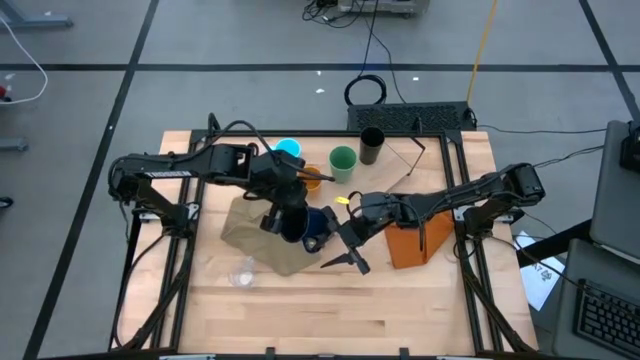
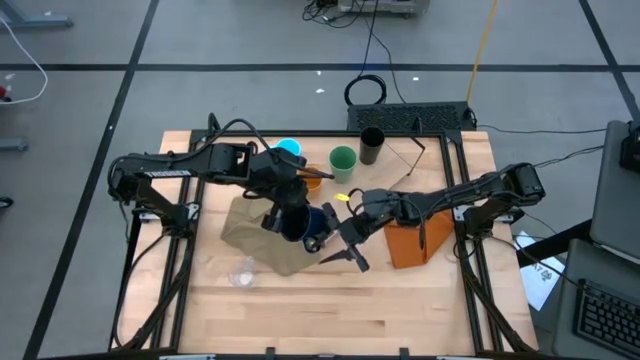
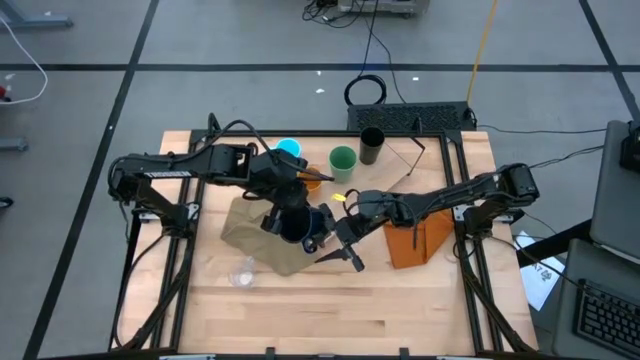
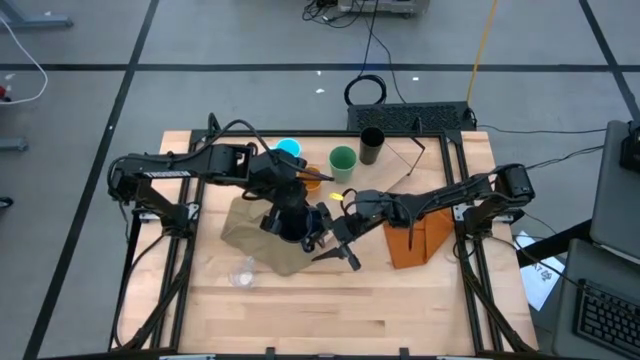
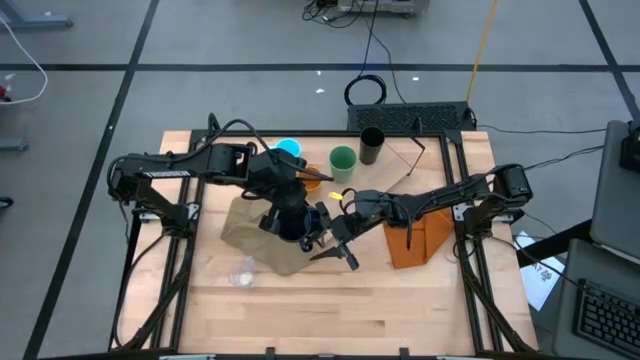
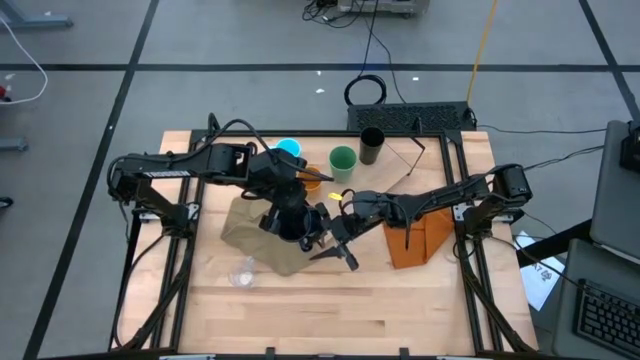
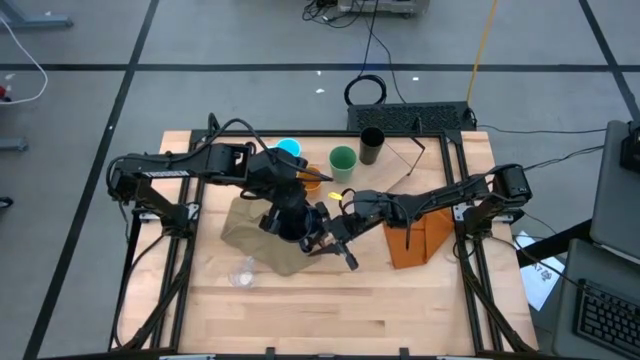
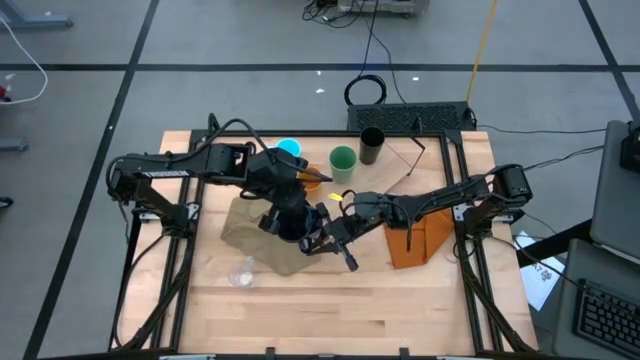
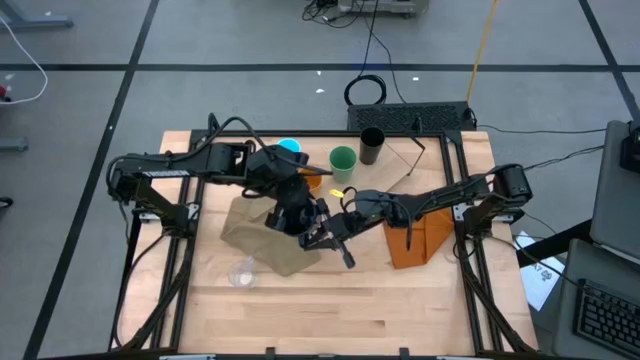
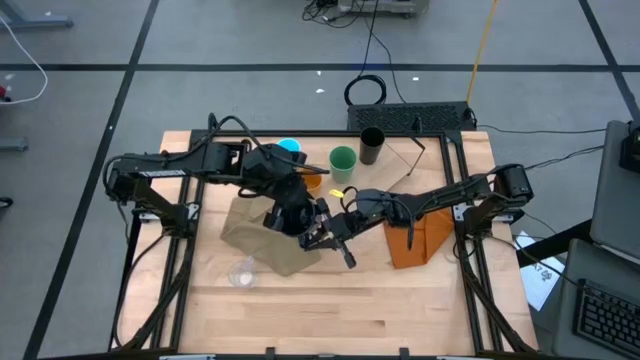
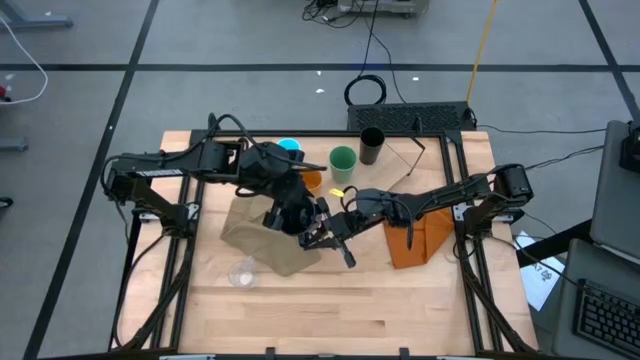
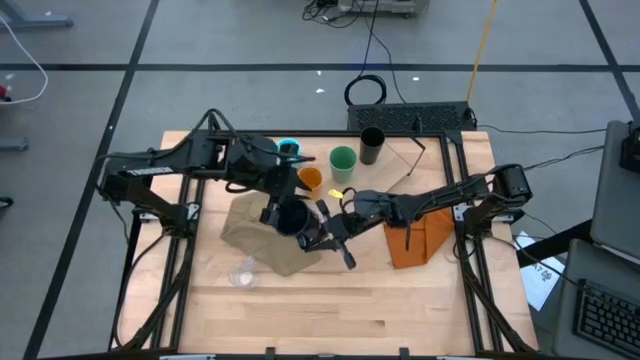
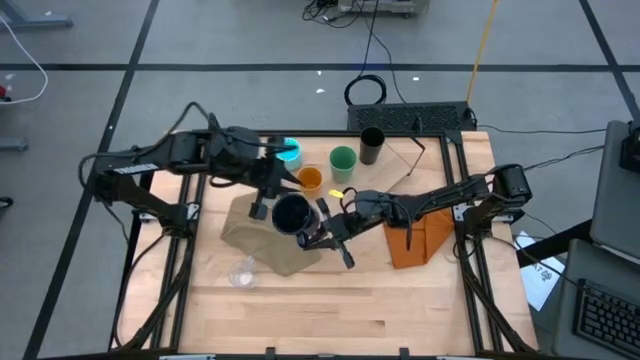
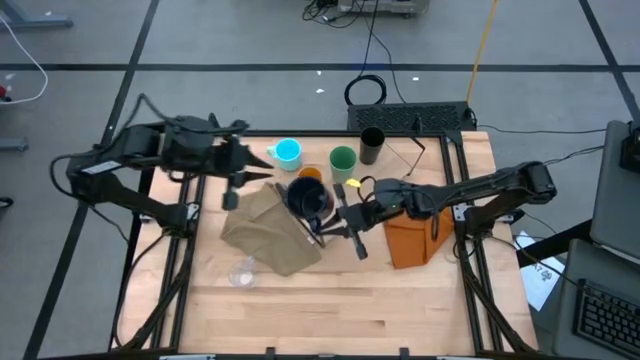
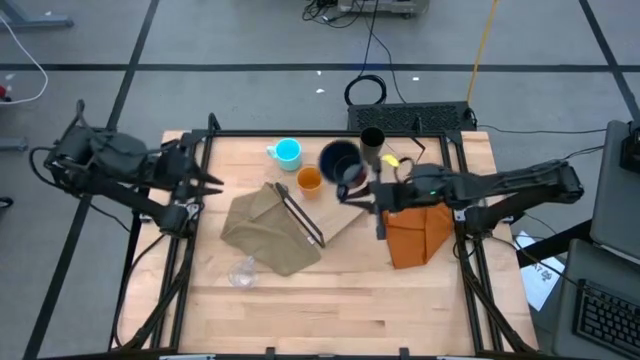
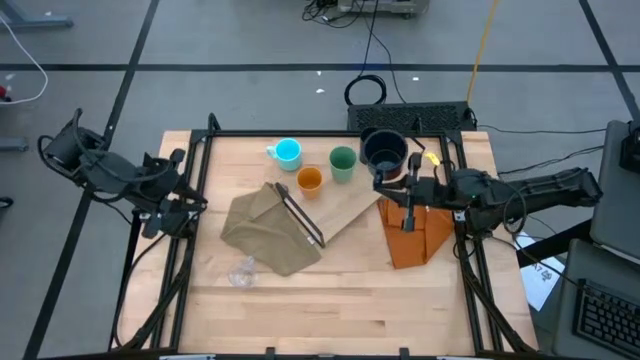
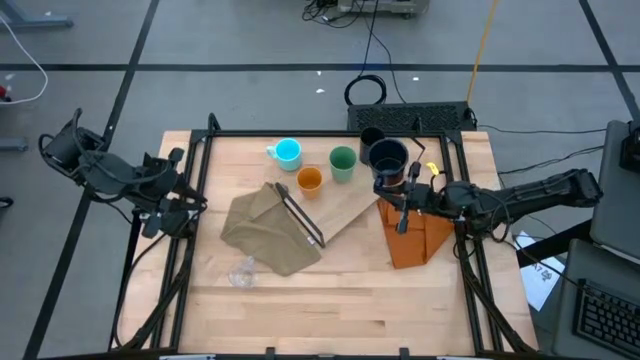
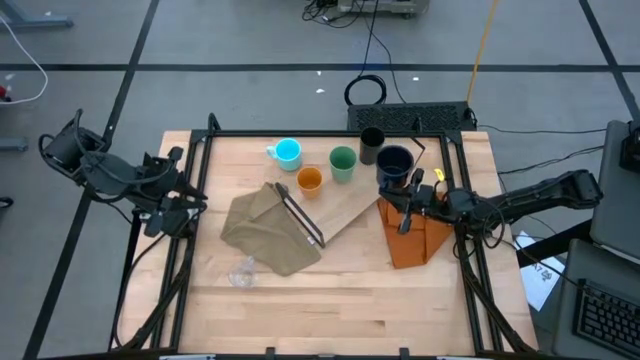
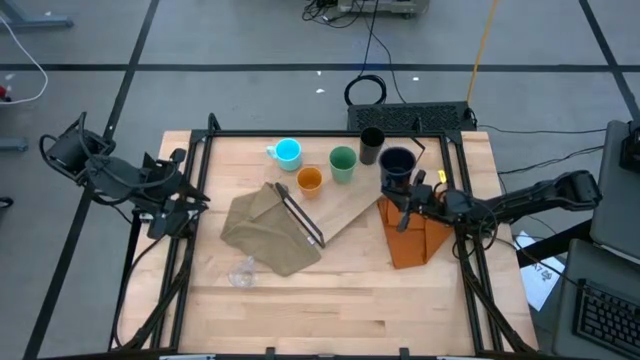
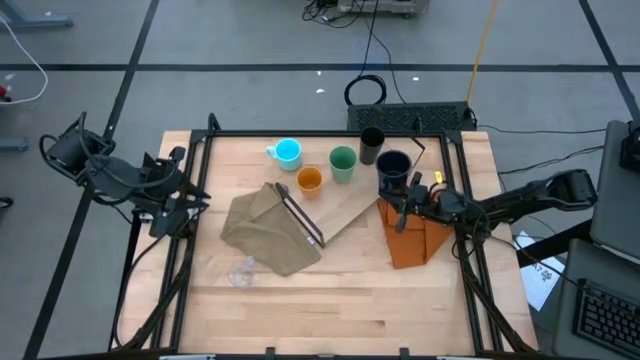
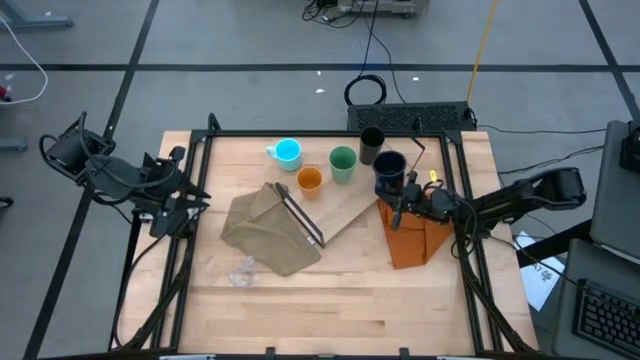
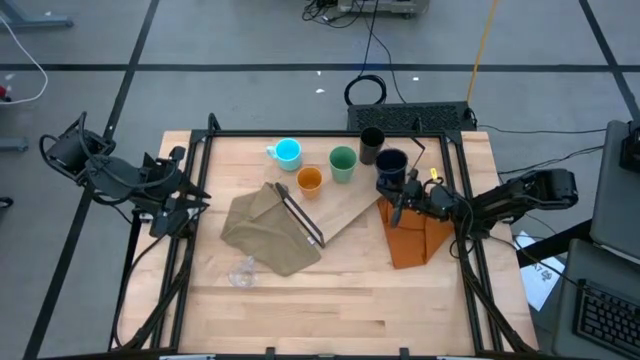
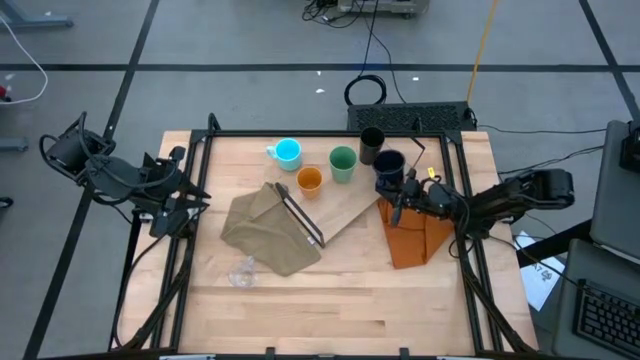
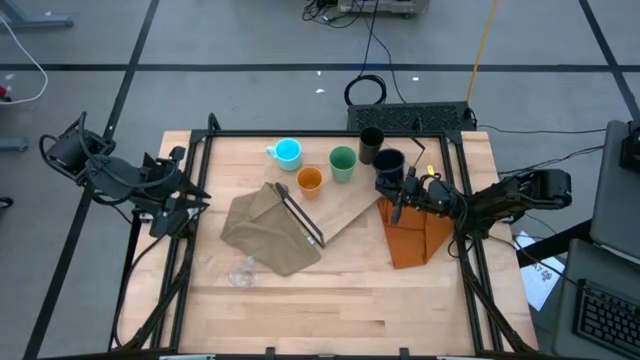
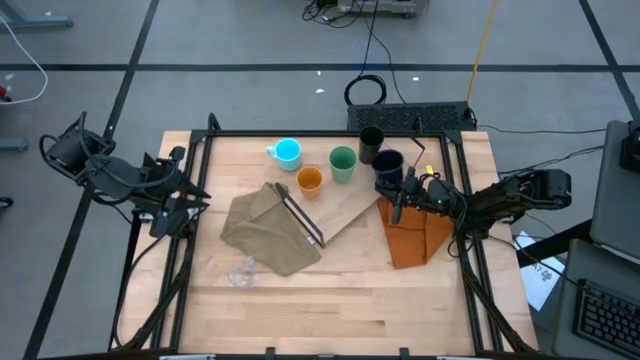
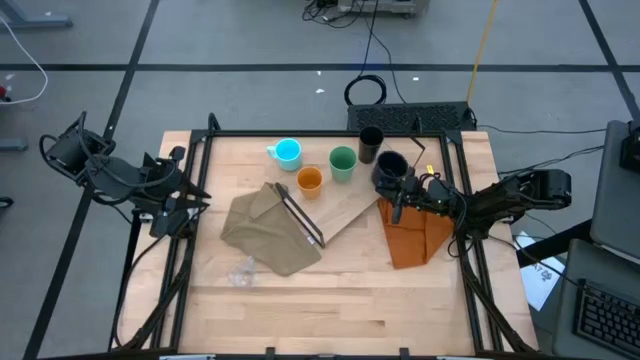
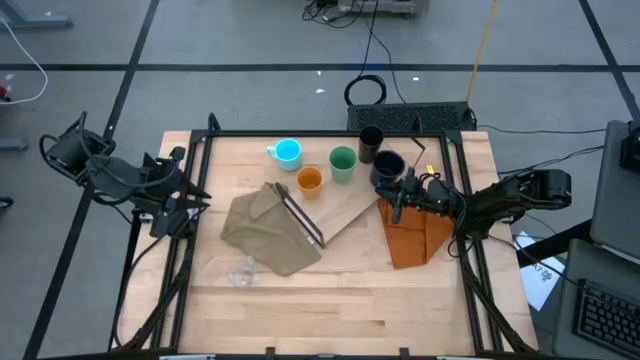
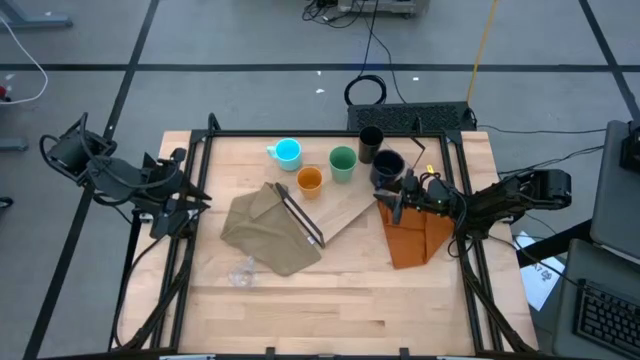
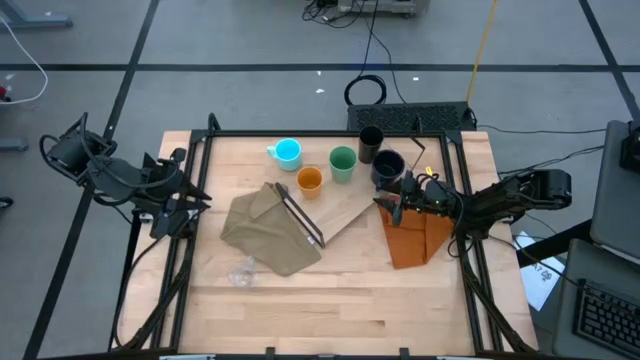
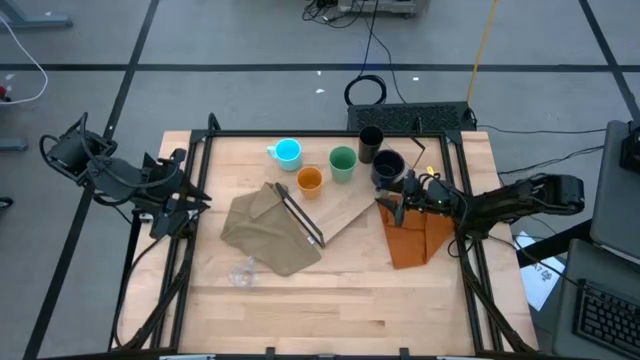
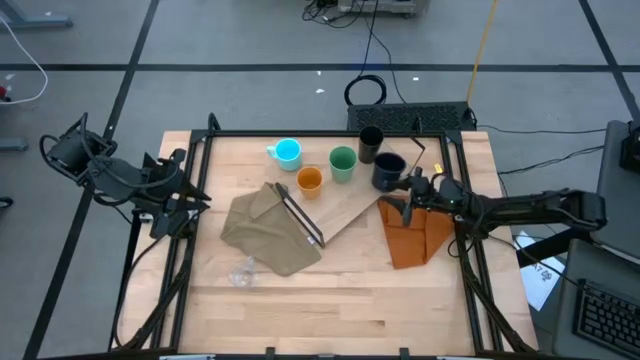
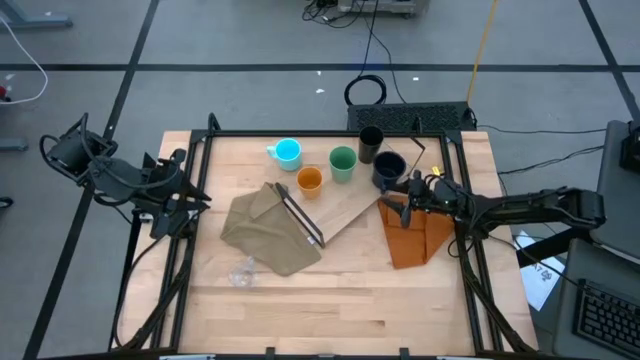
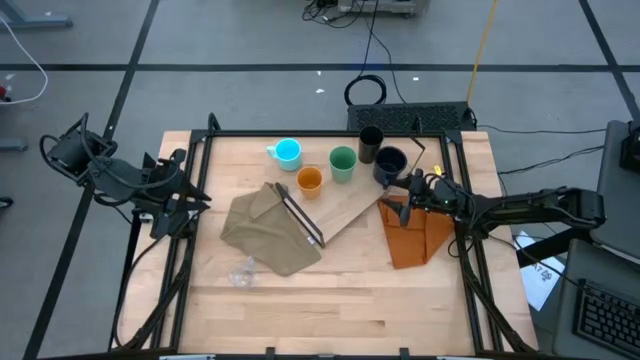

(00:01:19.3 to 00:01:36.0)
Task: Stack small to large cups/mugs on shelf
Put the dark blue mug on the shelf
